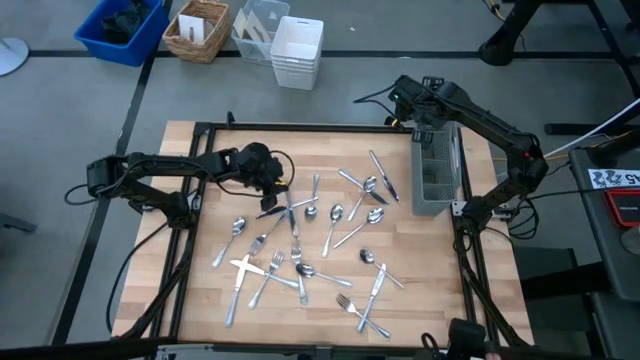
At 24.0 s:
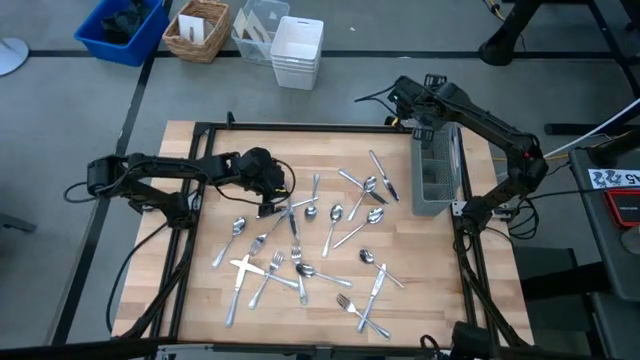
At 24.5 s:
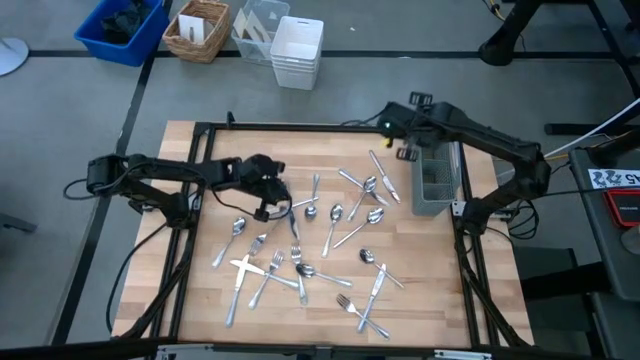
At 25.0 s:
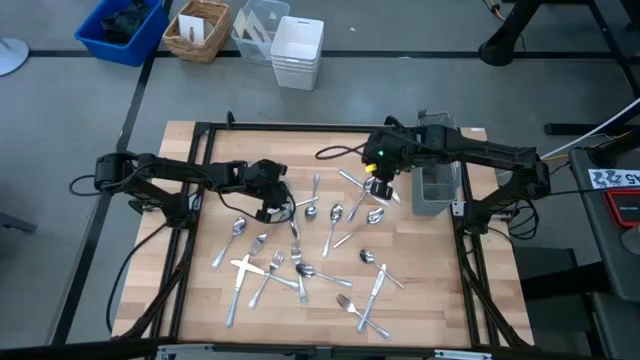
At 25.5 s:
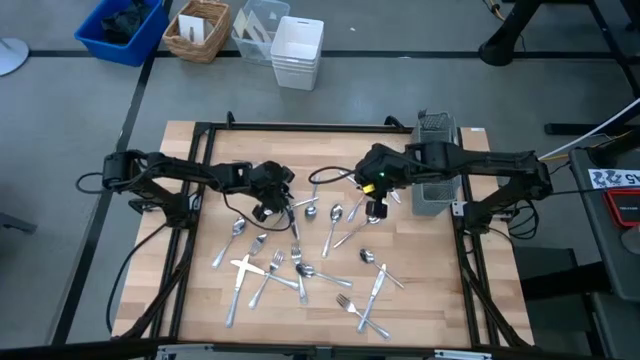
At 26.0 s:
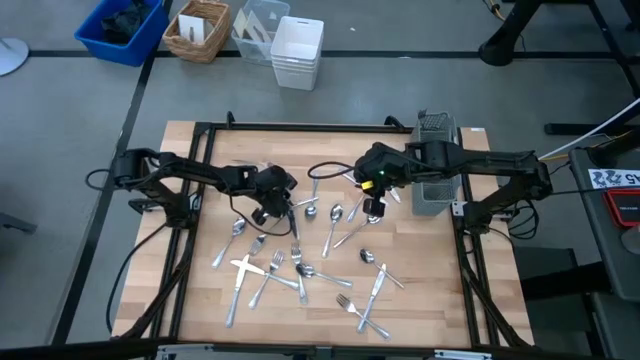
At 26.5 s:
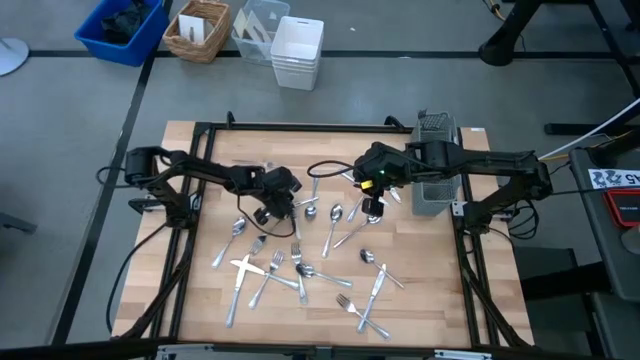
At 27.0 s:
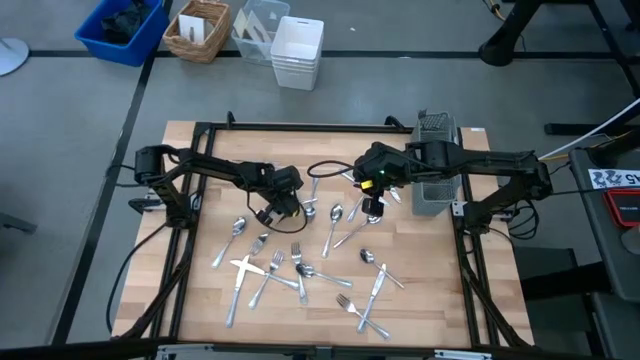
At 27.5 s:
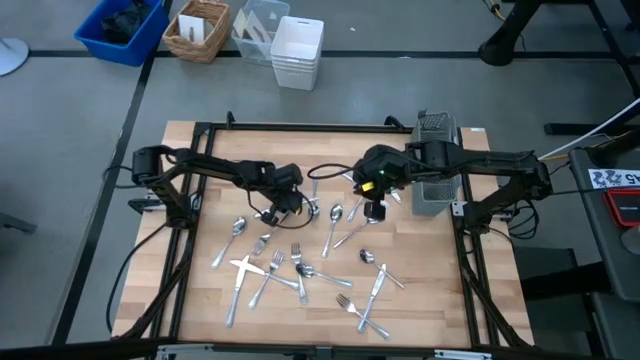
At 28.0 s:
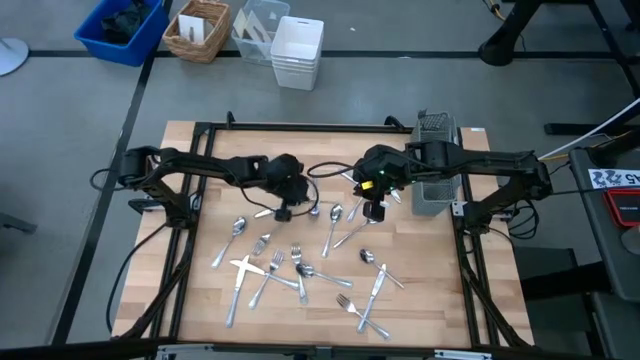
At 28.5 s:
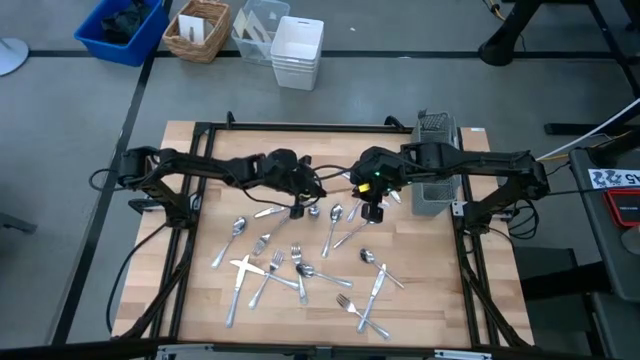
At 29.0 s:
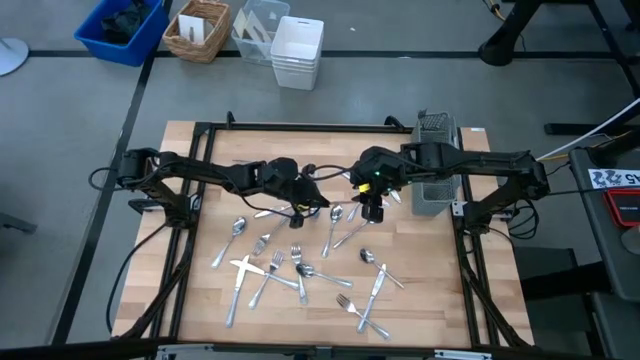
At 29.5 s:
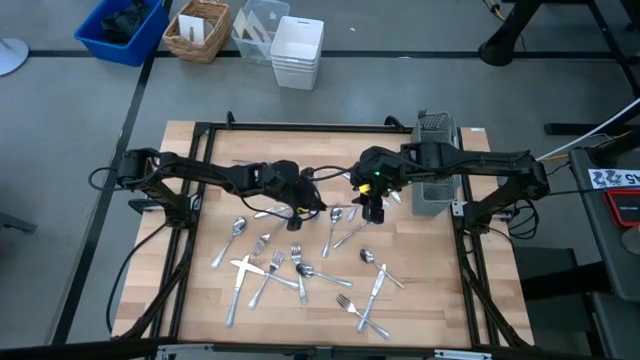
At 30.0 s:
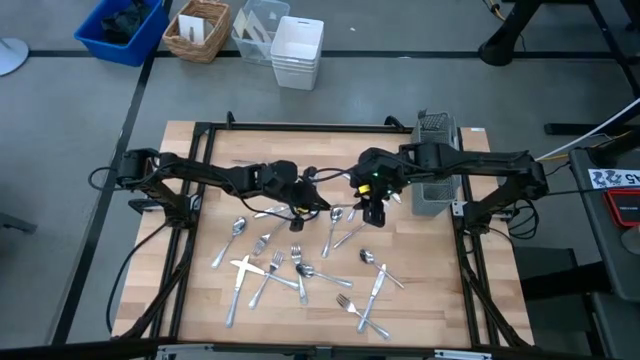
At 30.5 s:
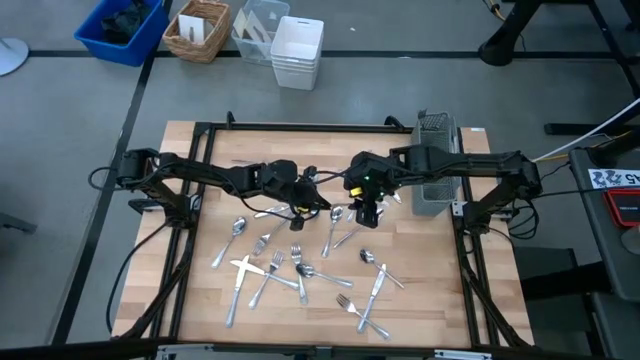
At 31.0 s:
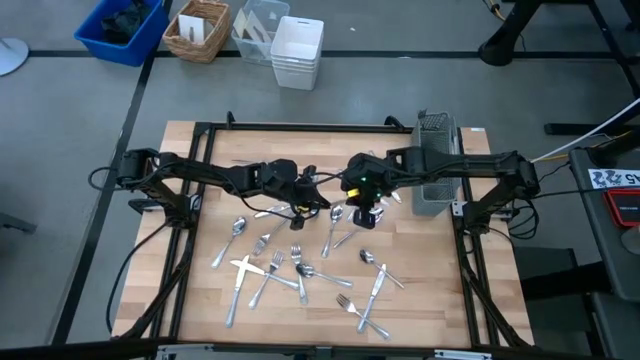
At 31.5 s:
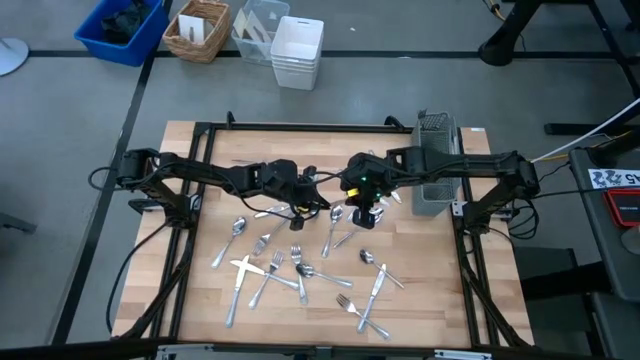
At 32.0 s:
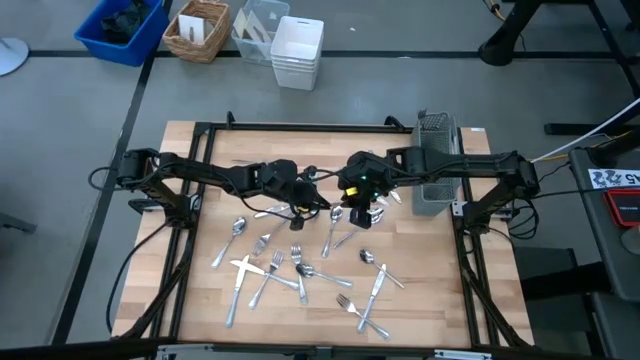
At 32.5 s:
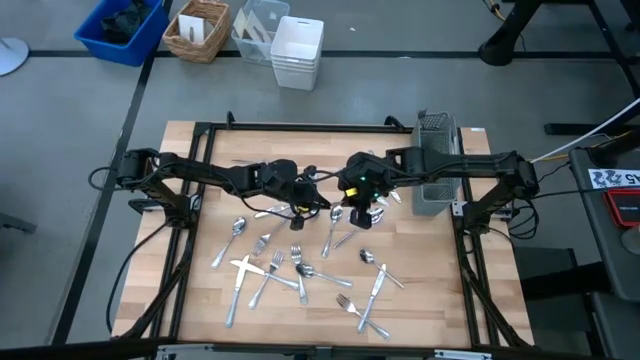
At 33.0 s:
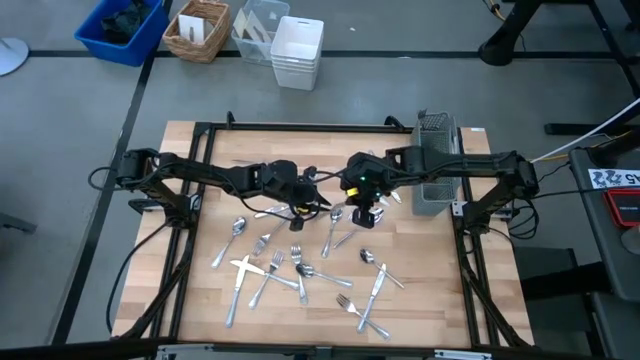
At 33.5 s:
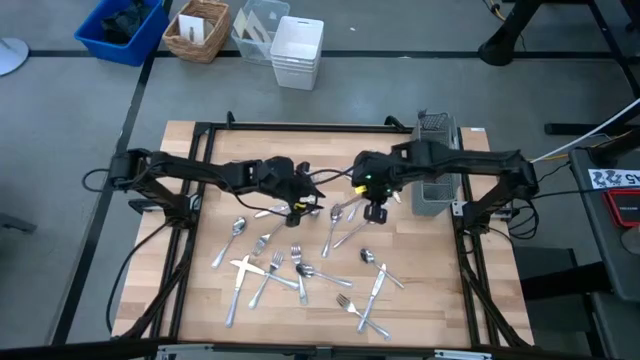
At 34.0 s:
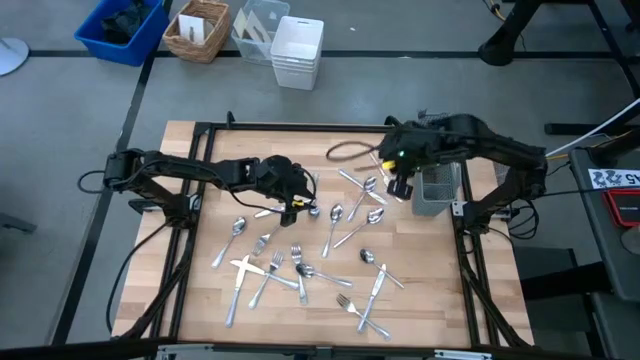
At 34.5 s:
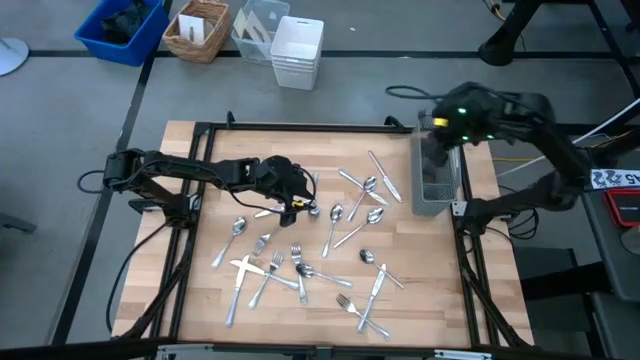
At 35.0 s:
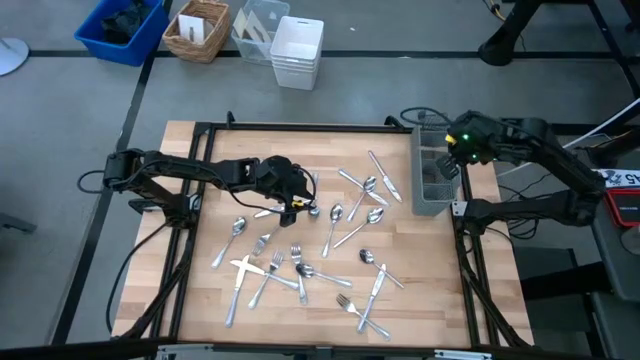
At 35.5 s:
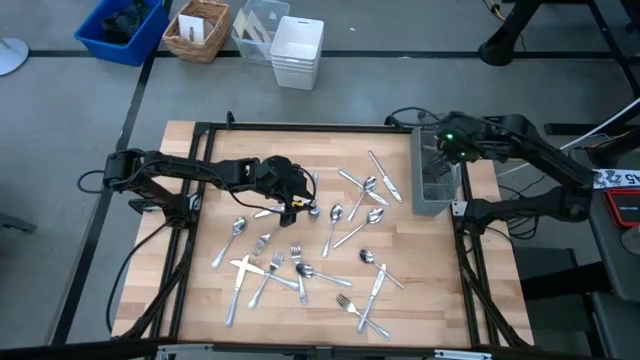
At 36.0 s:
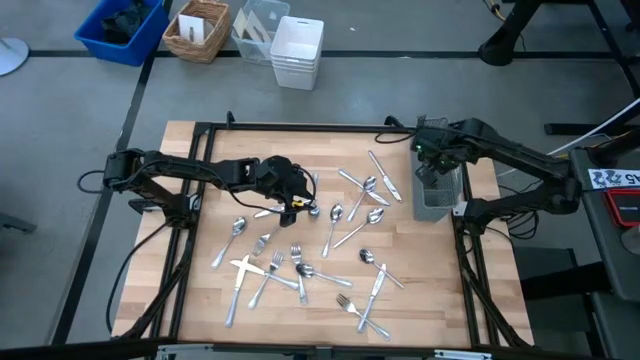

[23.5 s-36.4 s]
Task: Sort silverware
Put the knife into the middle section of the utensil holder

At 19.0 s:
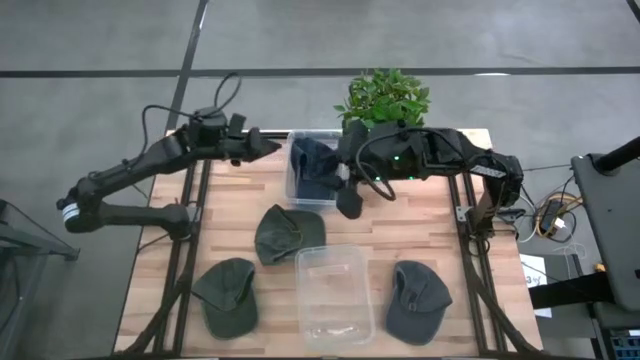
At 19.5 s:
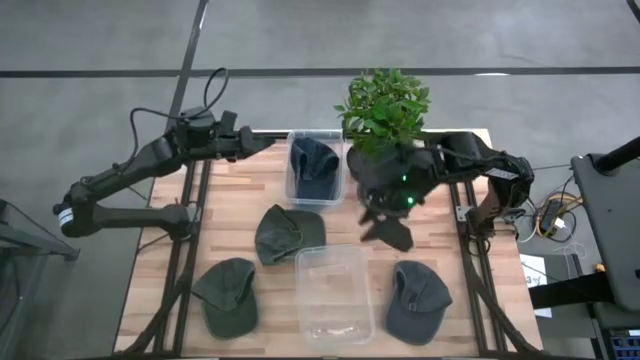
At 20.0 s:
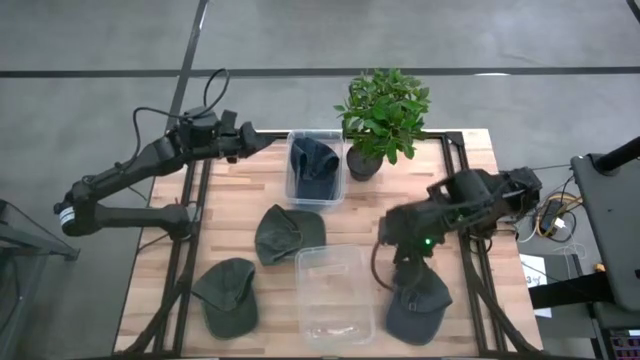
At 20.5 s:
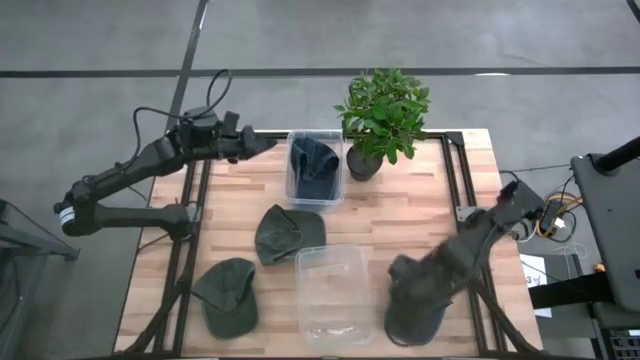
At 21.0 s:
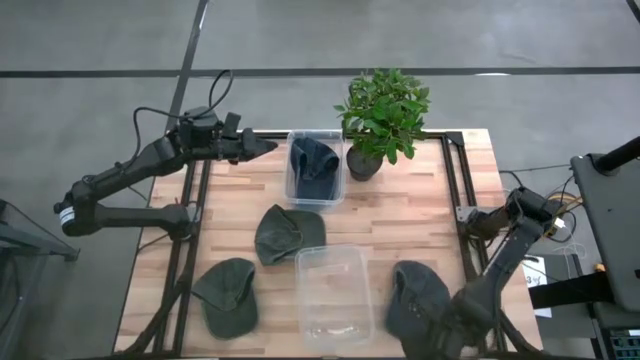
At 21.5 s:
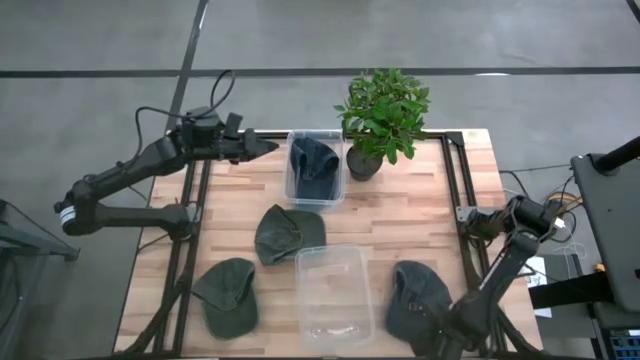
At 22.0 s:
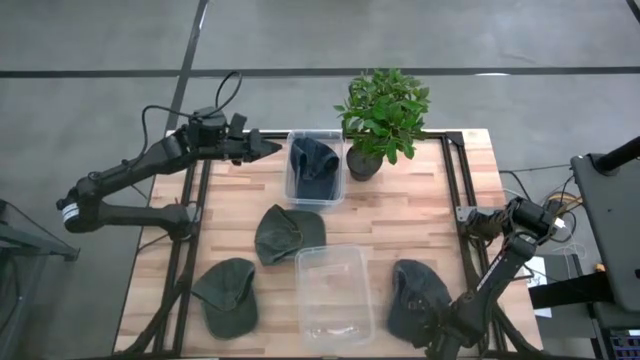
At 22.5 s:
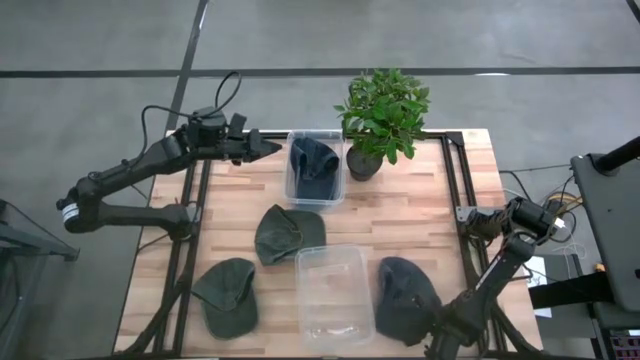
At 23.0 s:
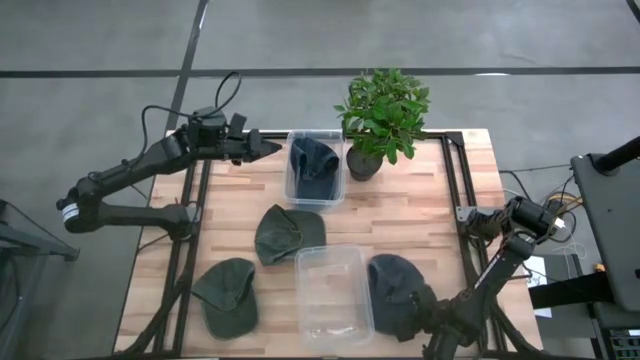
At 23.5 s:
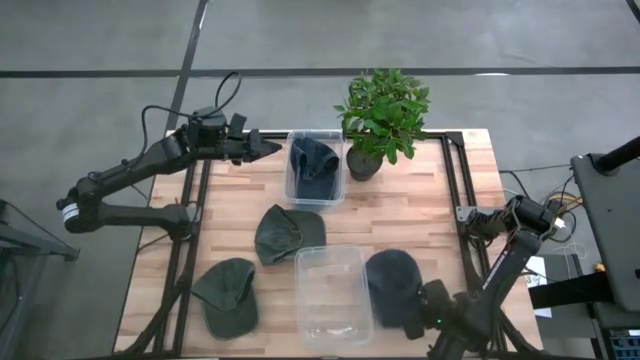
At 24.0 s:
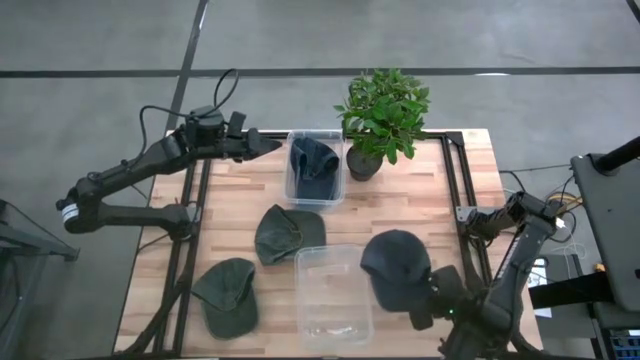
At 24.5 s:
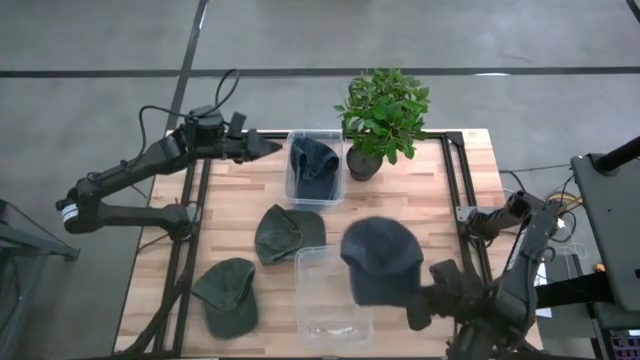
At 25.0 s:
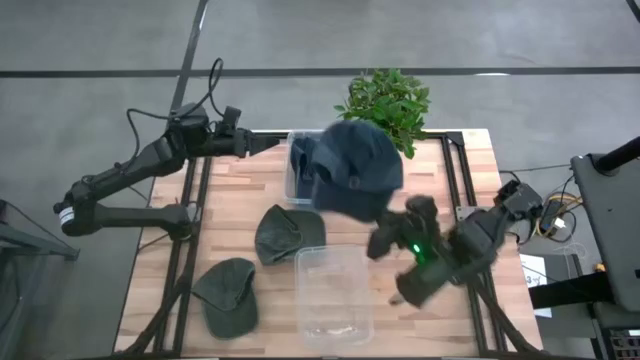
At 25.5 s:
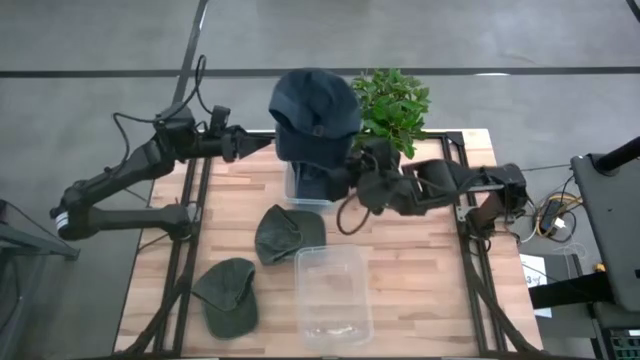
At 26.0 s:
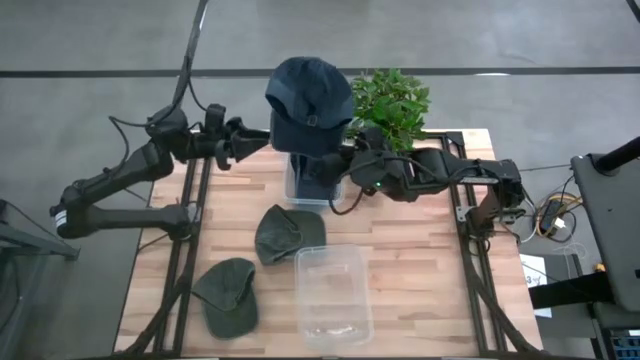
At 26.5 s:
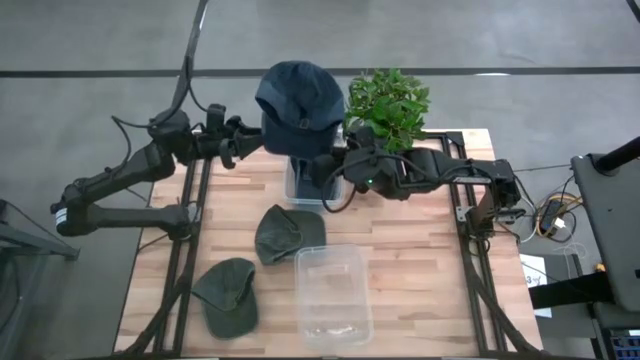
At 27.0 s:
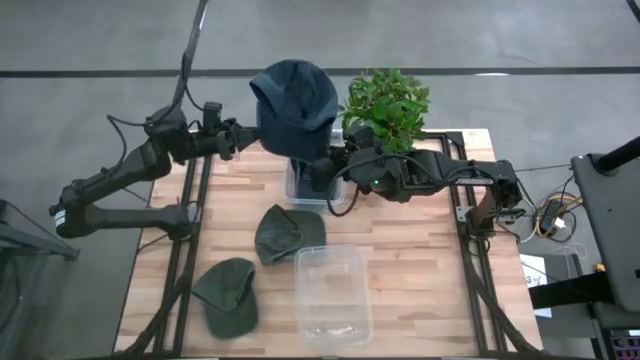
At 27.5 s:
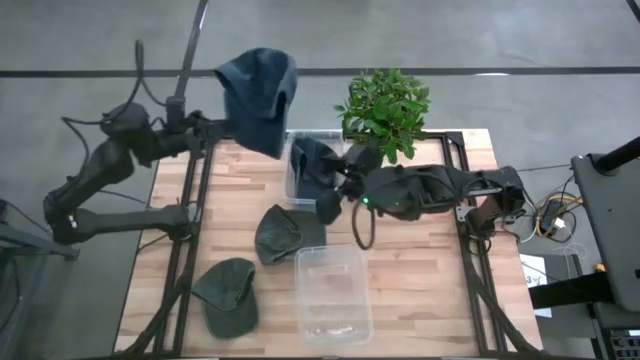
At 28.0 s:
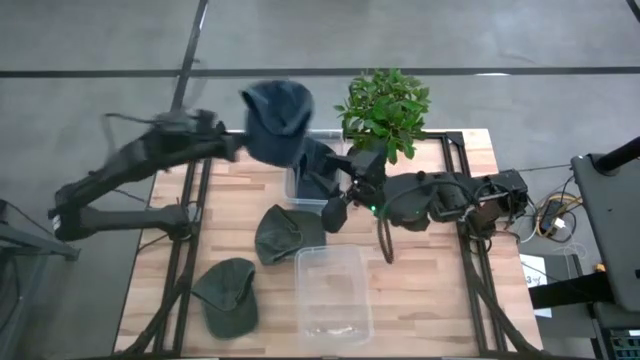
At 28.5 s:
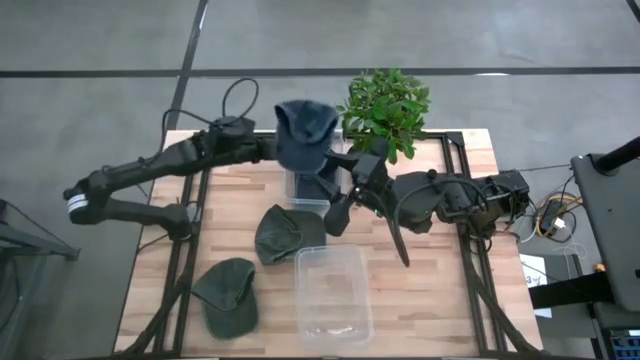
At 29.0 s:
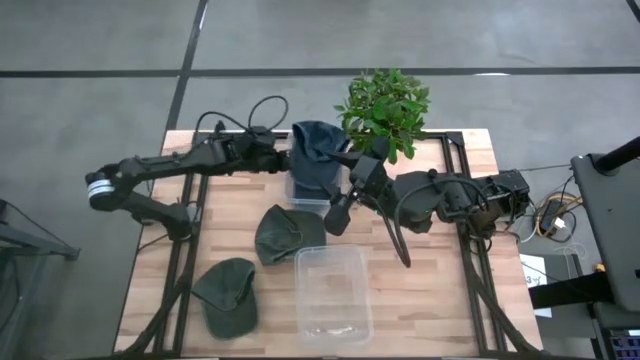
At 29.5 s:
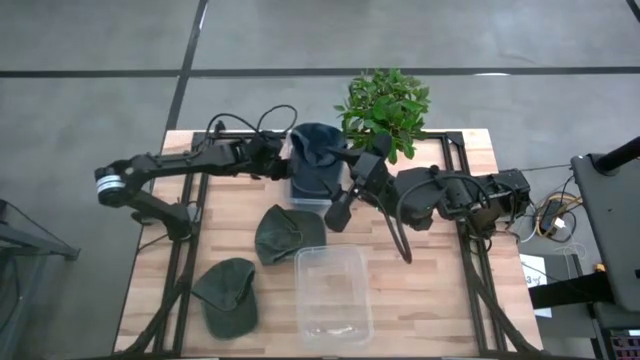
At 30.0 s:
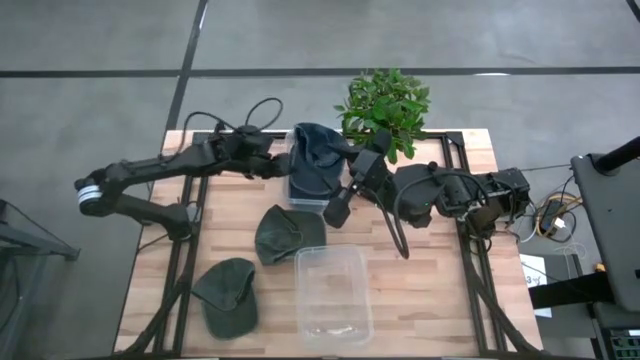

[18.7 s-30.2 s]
Task: Pick & Place hat
Put the blue cap into the top transparent bin
